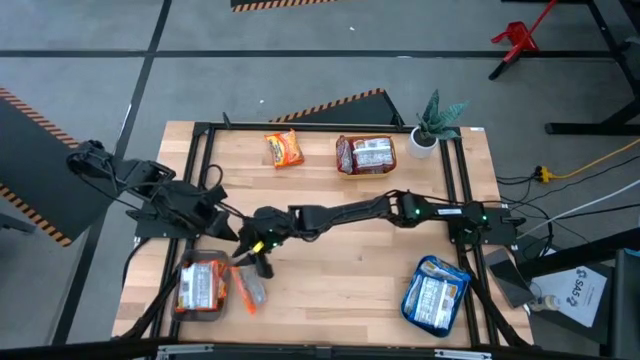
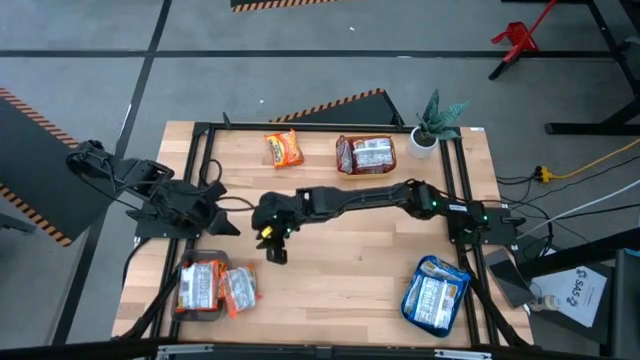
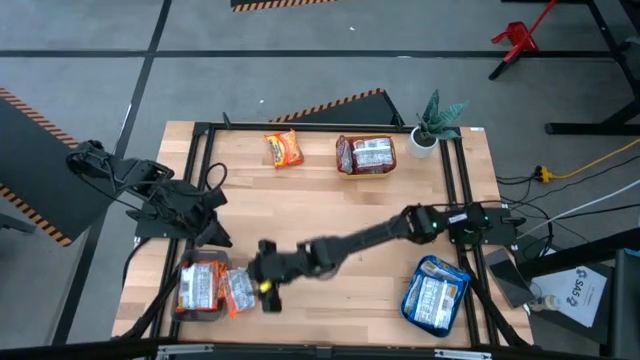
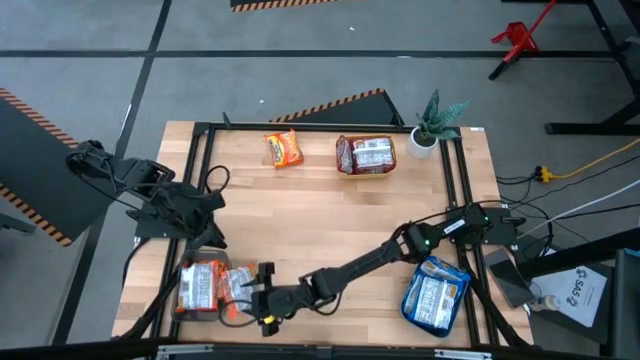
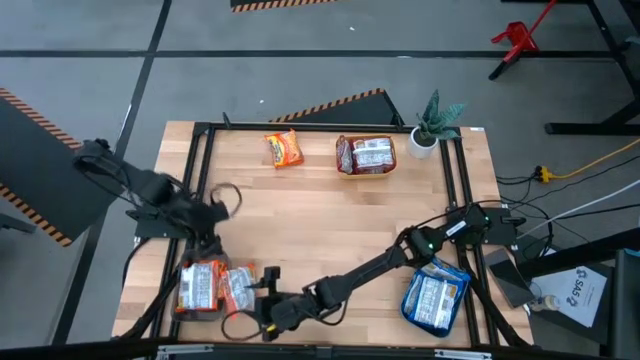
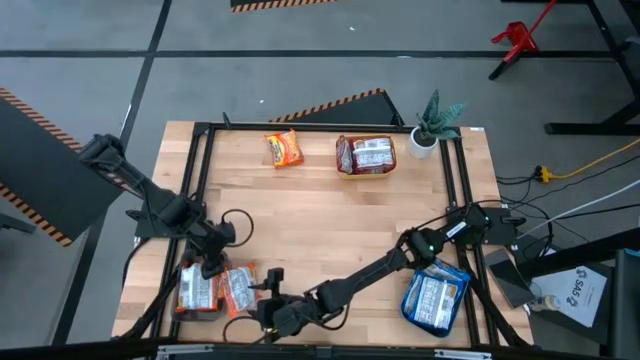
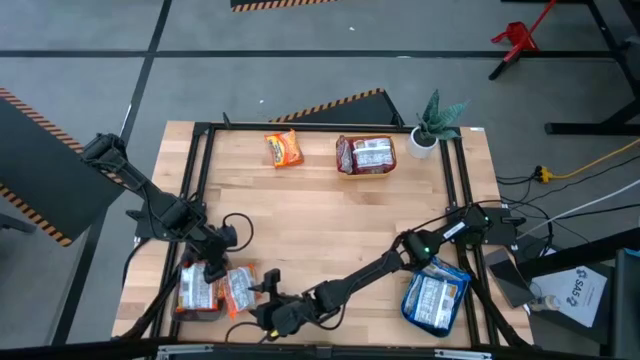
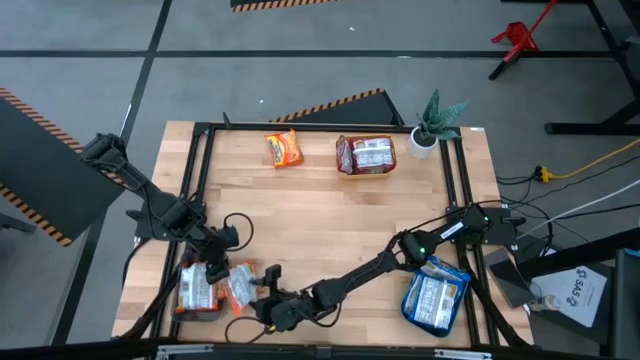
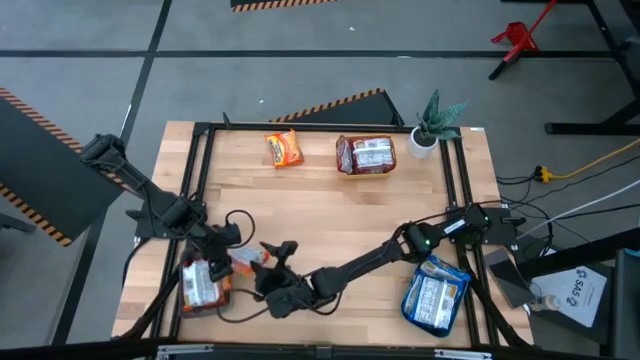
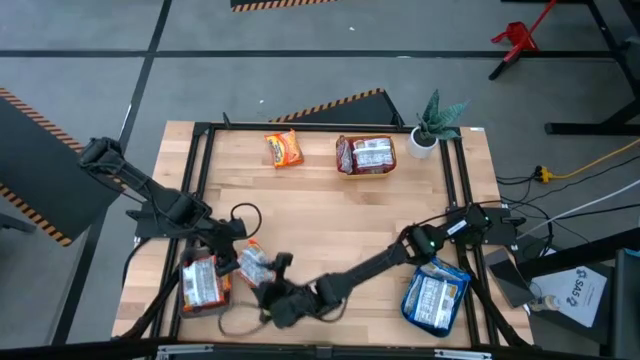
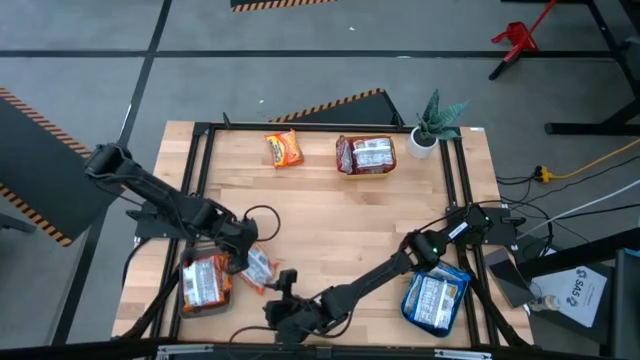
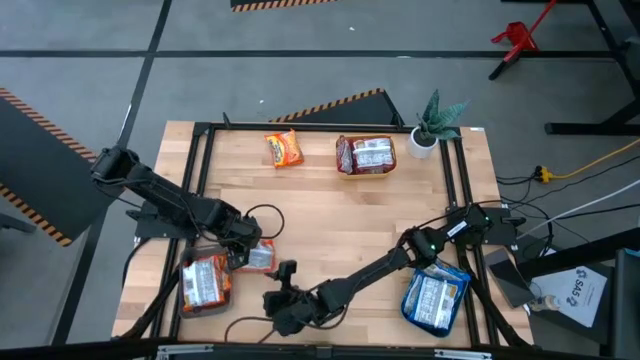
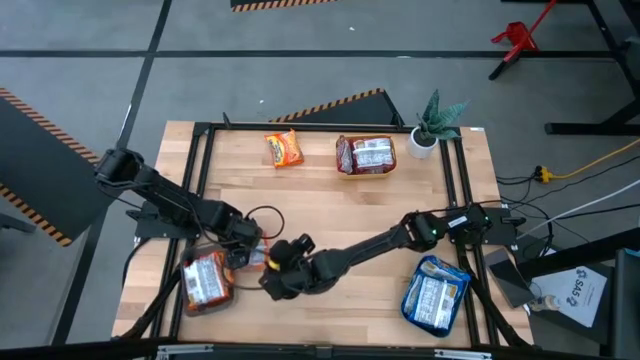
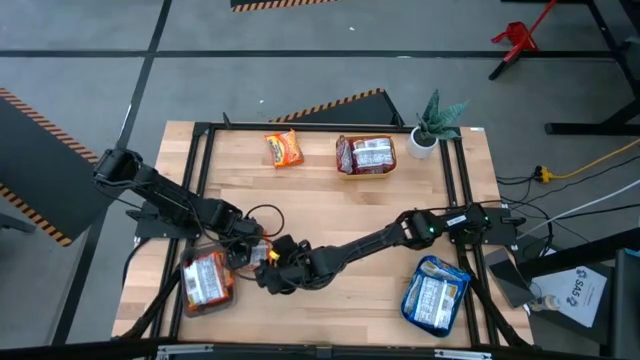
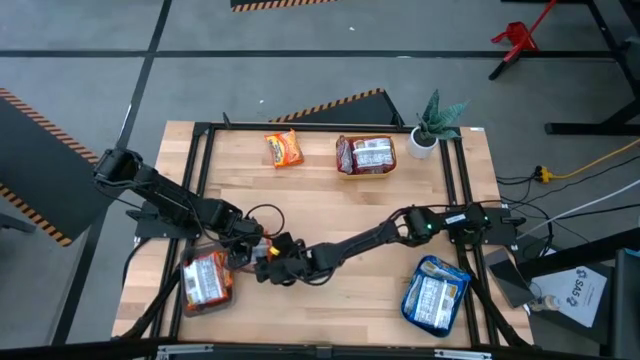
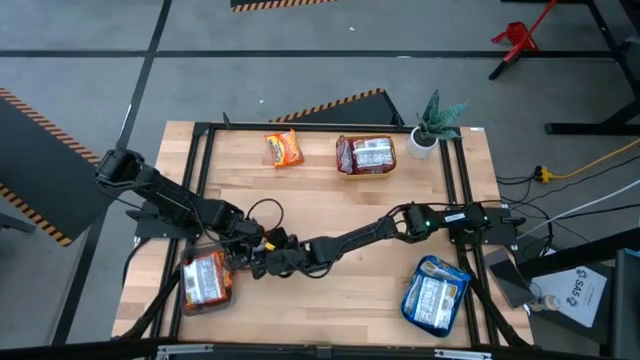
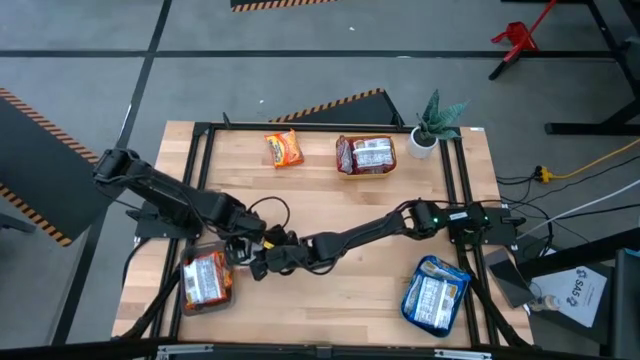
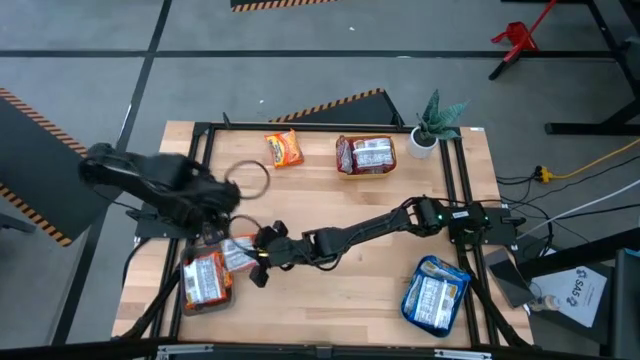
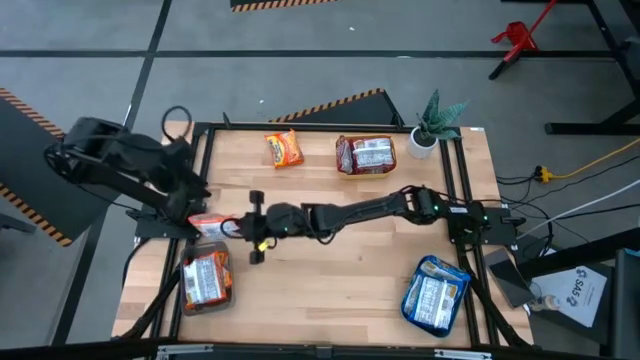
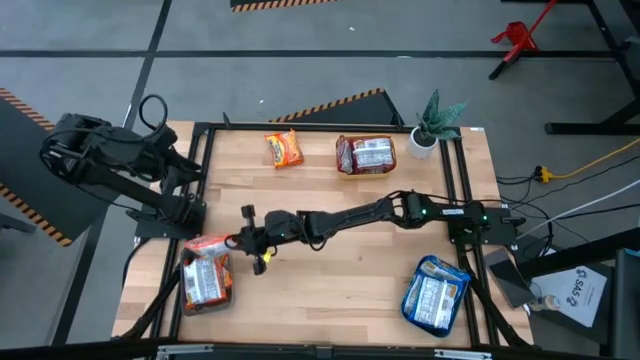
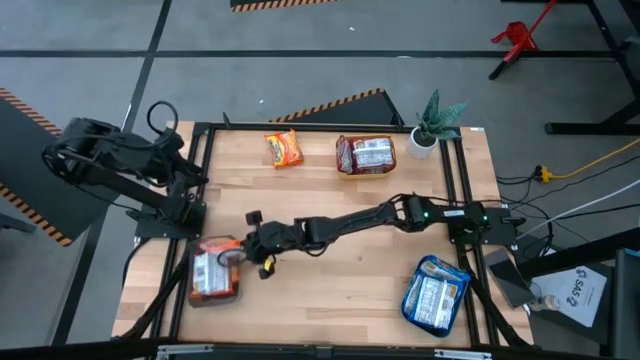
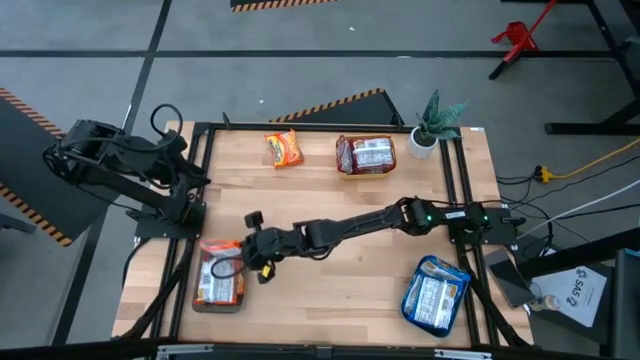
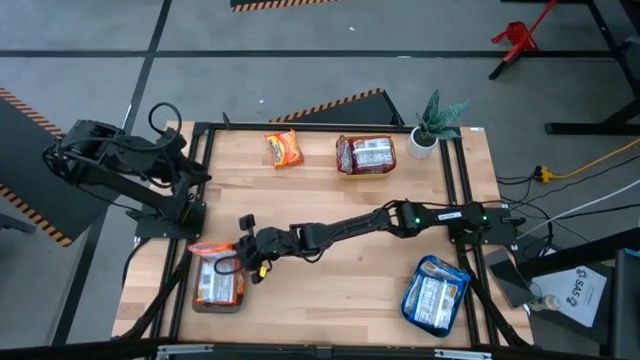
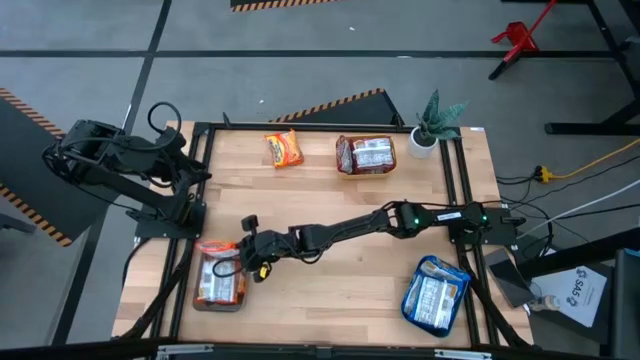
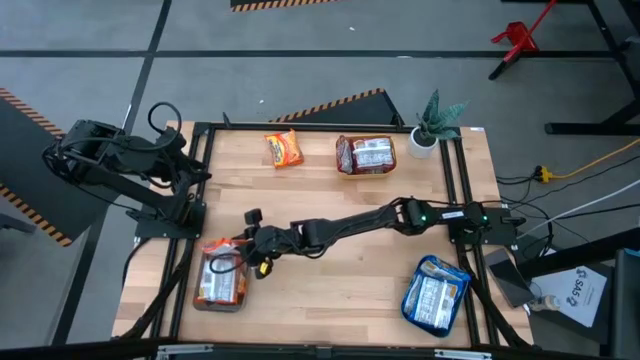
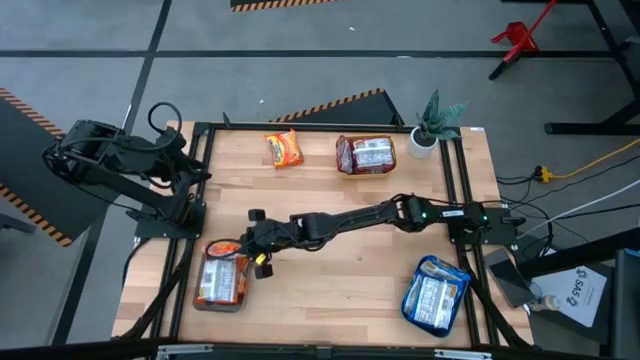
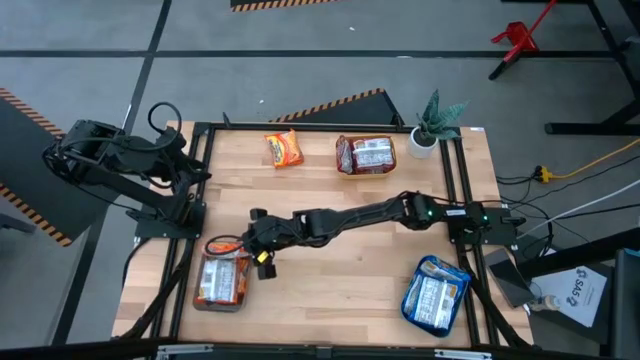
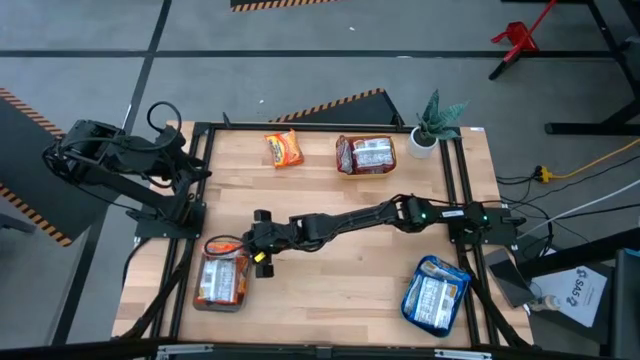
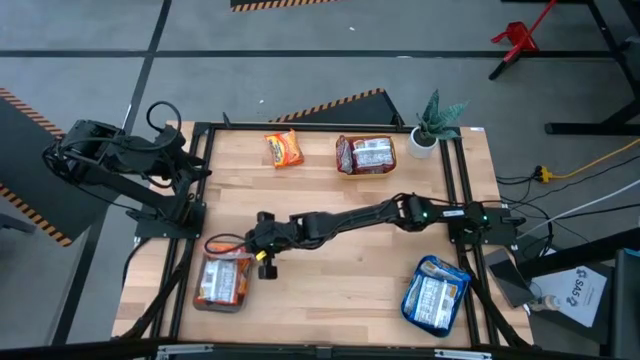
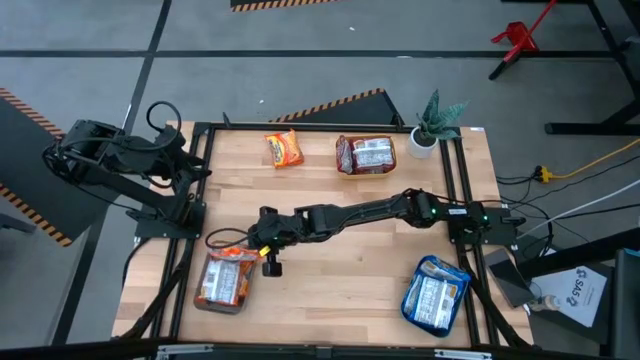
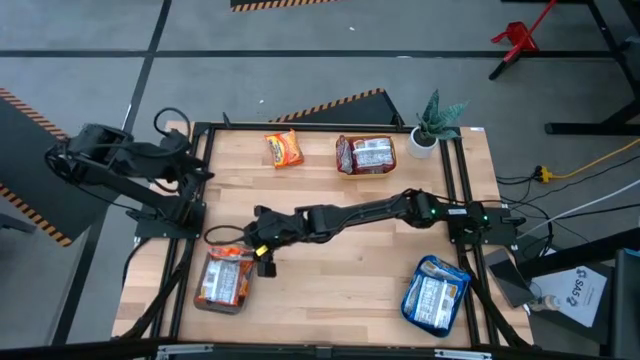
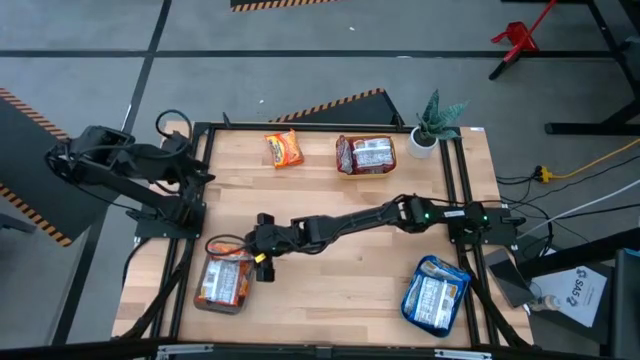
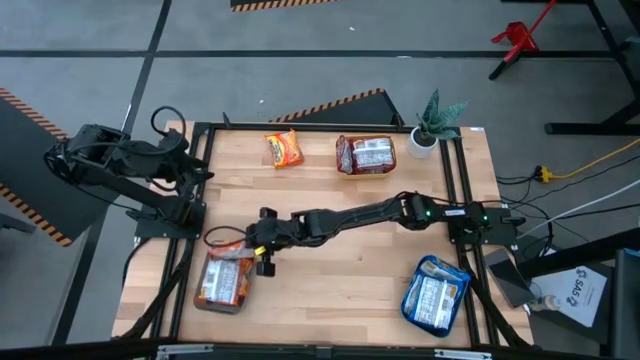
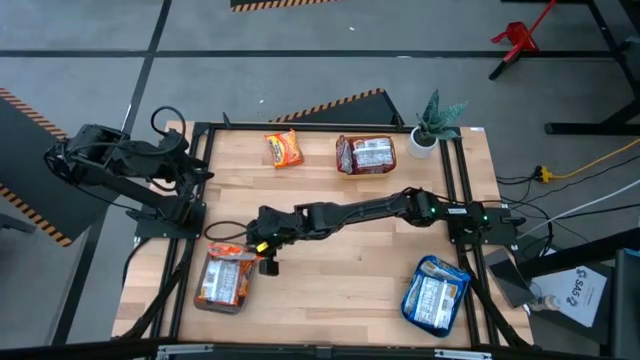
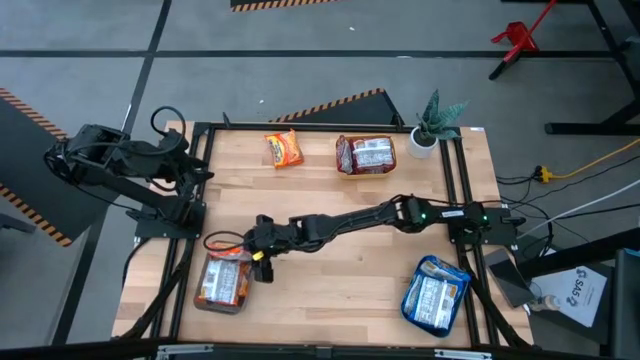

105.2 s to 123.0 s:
Task: Sort Maruchan noodles
Put the orange noodle pack into the black bin

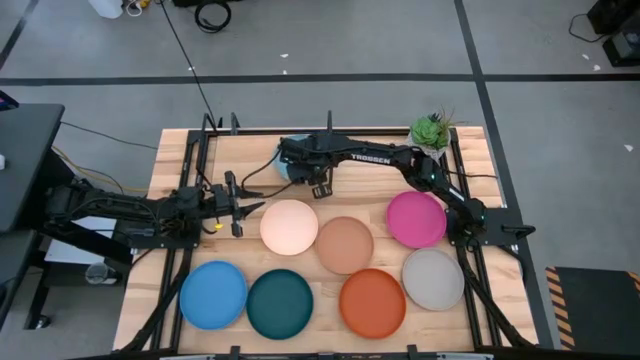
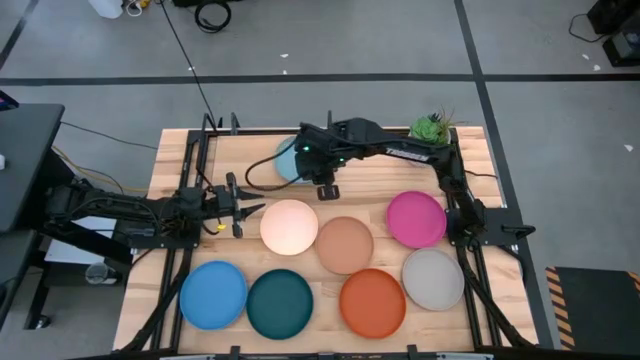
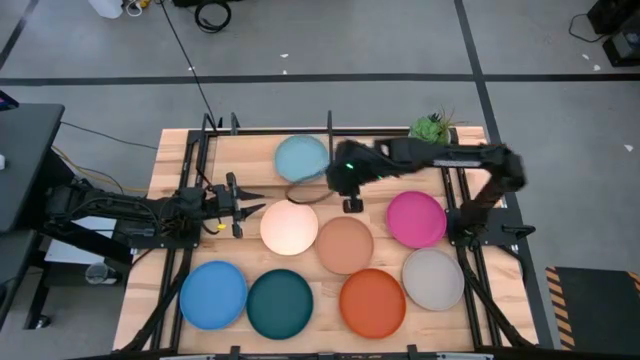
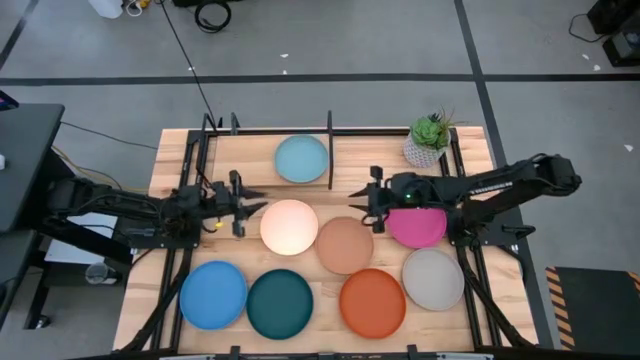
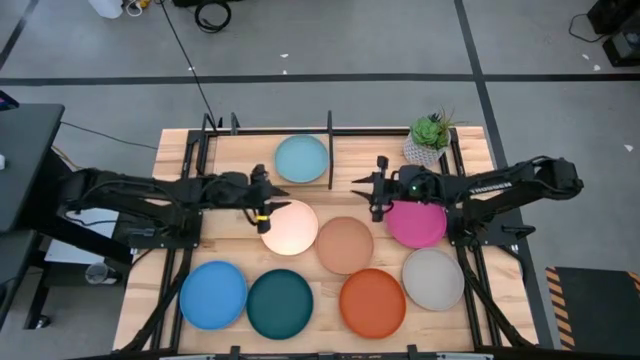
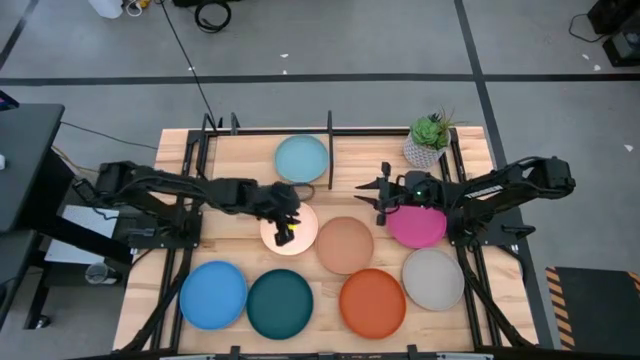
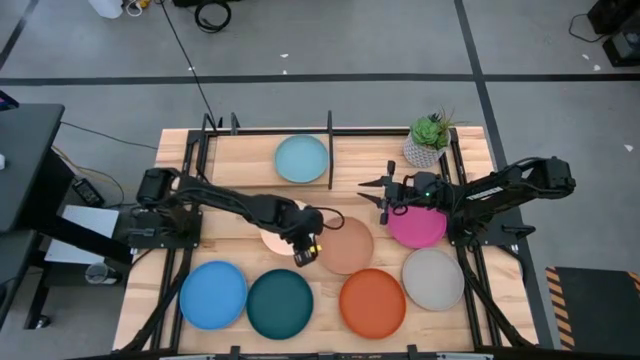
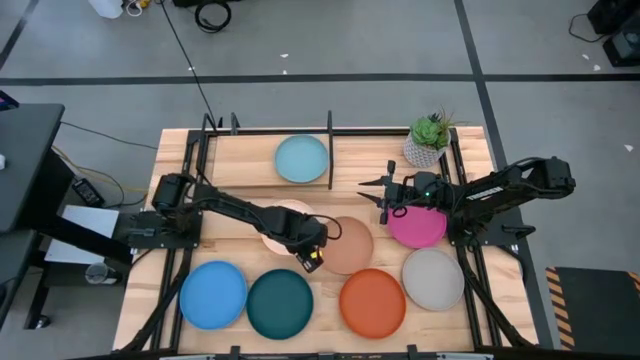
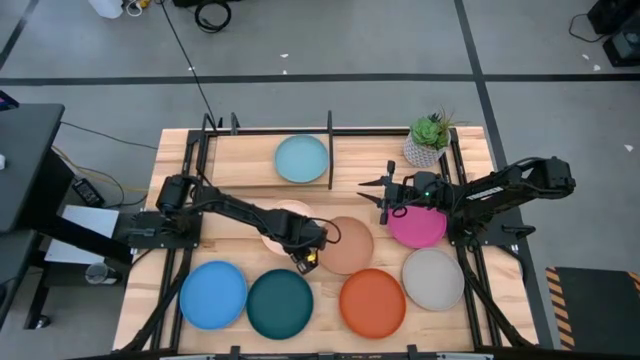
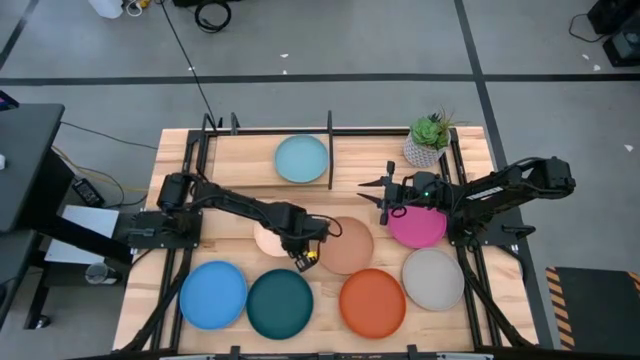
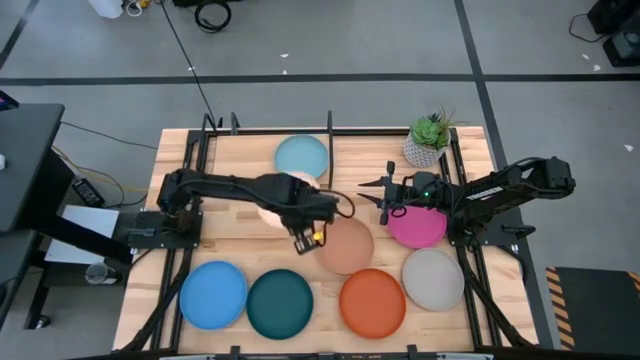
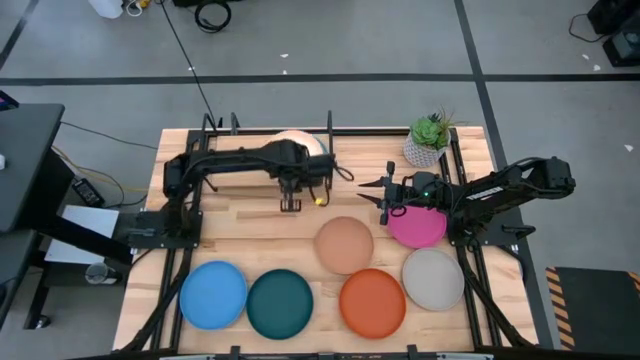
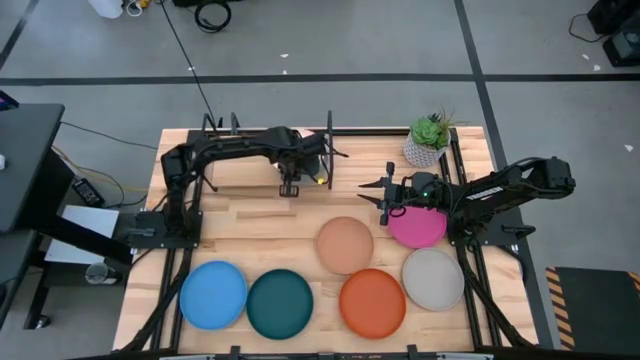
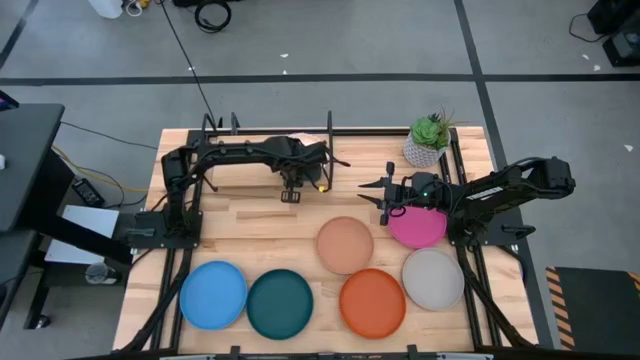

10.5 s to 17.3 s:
Task: Place and stack plates onto a shelf
Stack the white plate on top of the light blue plate on the shelf
